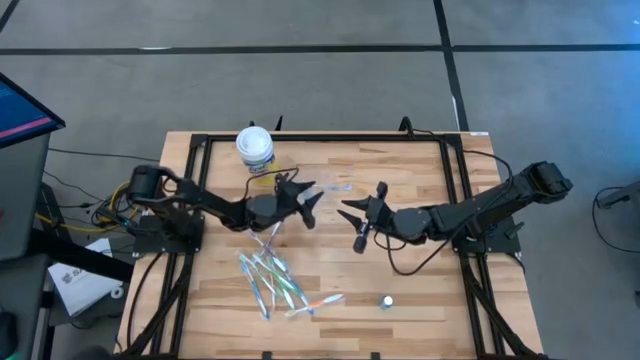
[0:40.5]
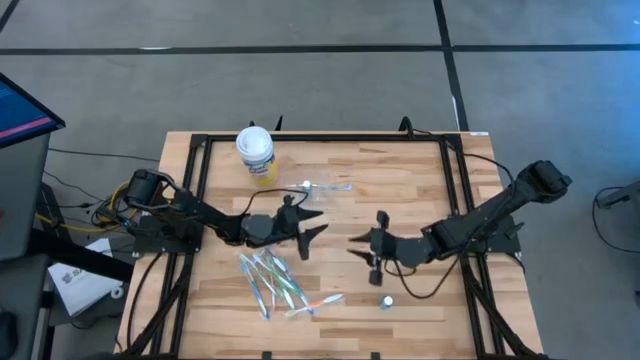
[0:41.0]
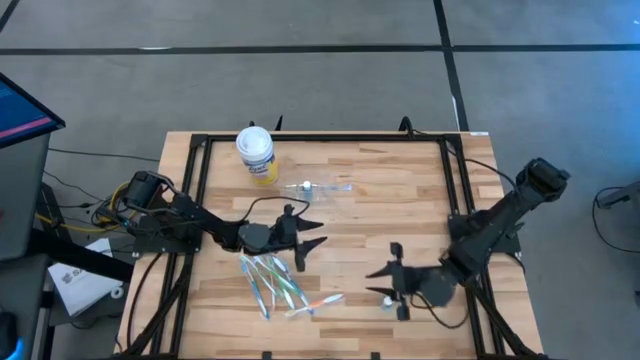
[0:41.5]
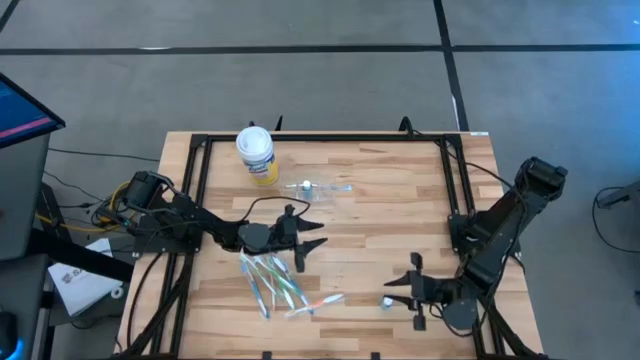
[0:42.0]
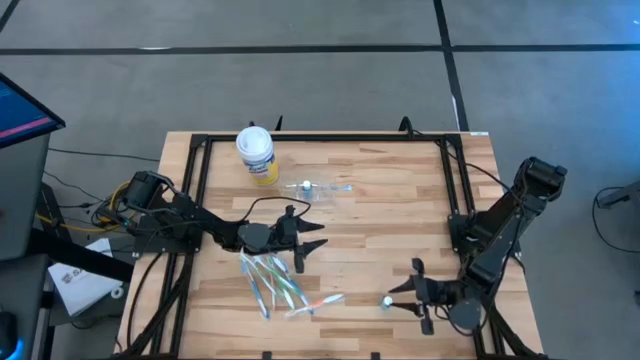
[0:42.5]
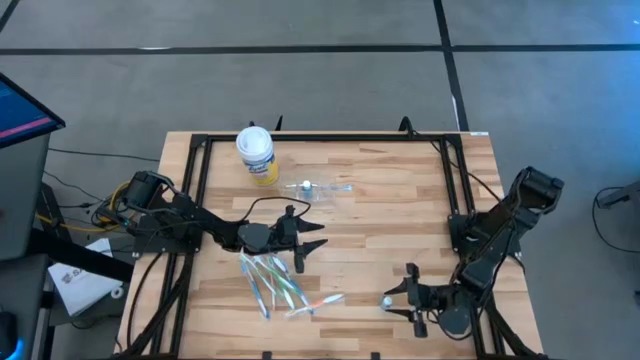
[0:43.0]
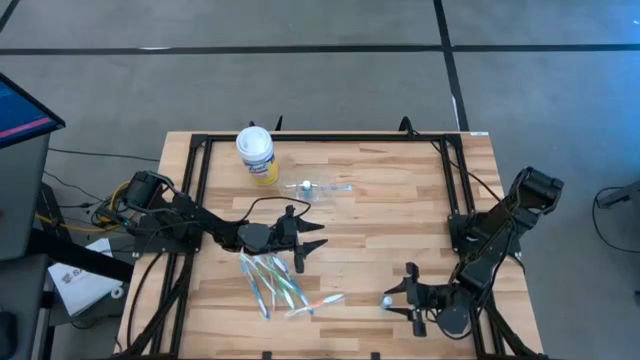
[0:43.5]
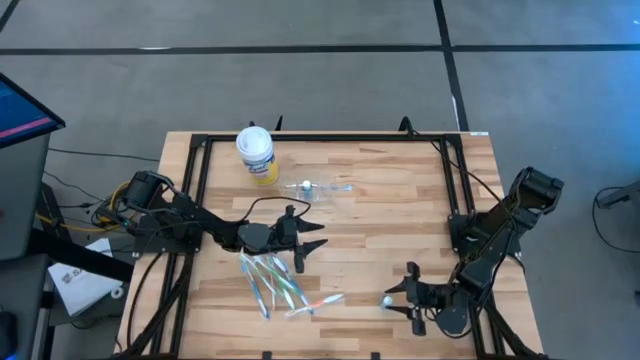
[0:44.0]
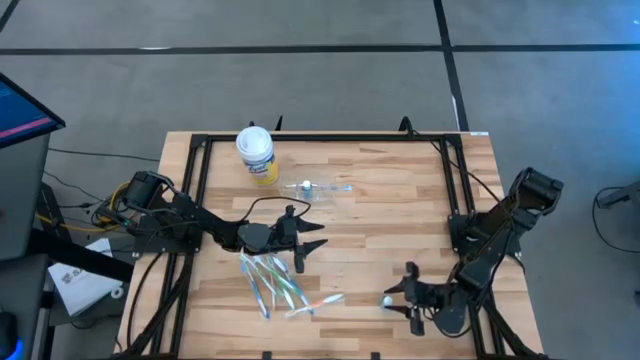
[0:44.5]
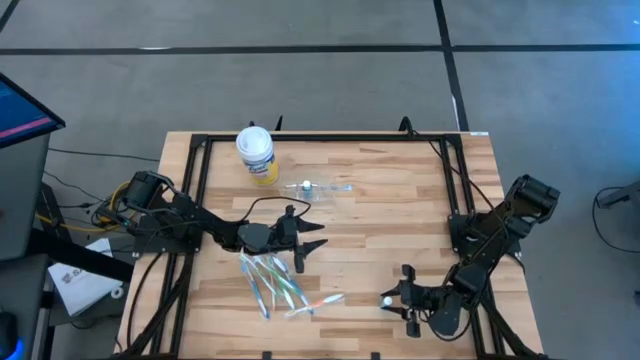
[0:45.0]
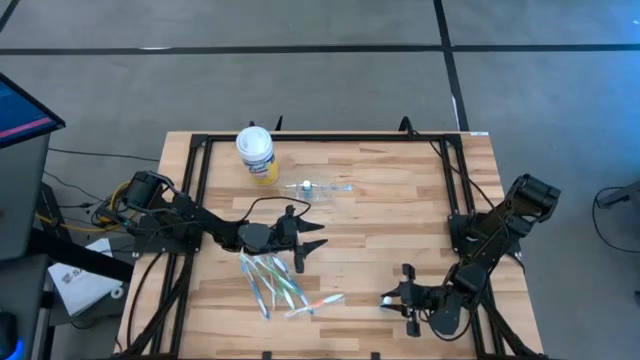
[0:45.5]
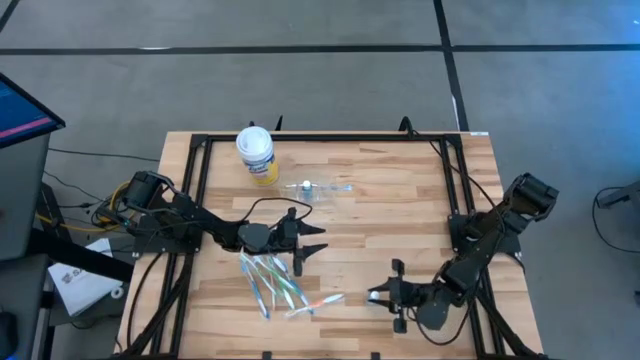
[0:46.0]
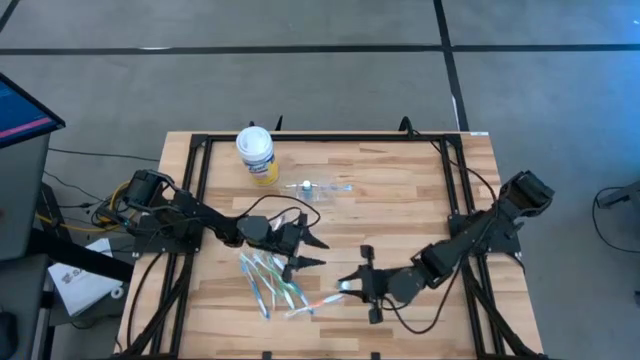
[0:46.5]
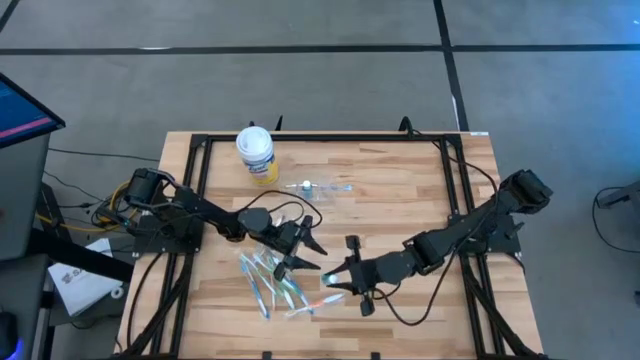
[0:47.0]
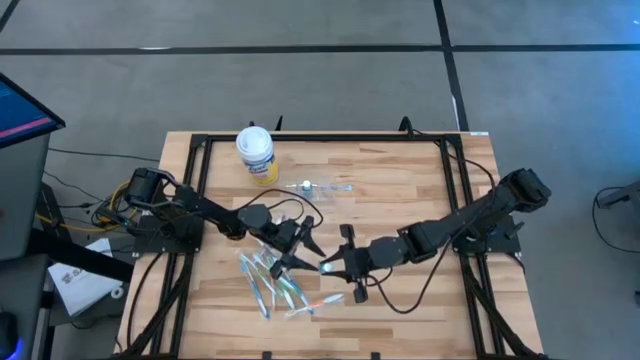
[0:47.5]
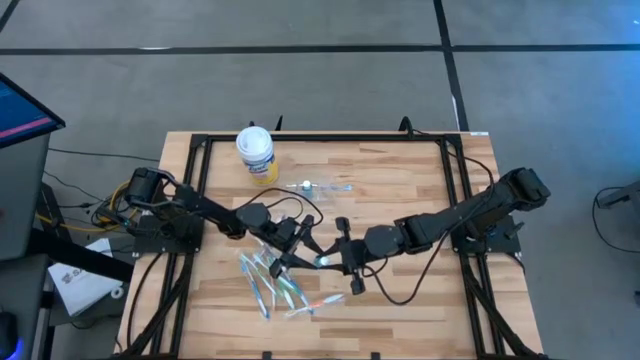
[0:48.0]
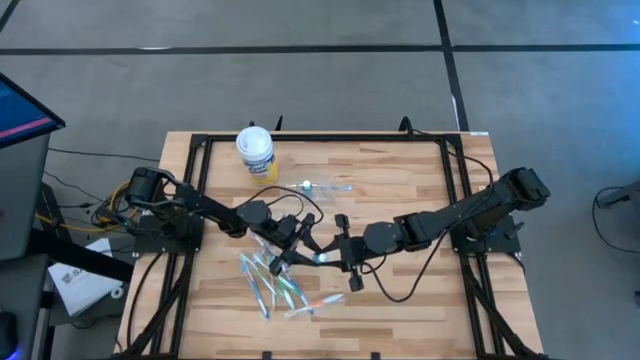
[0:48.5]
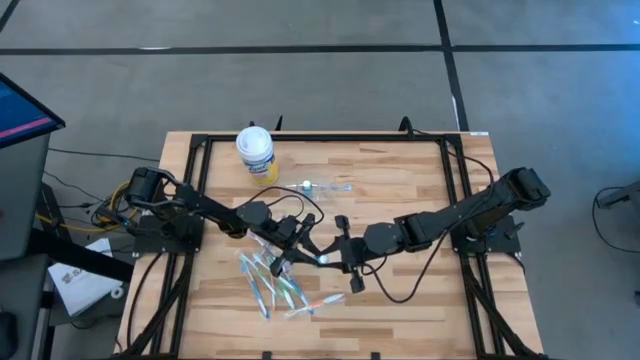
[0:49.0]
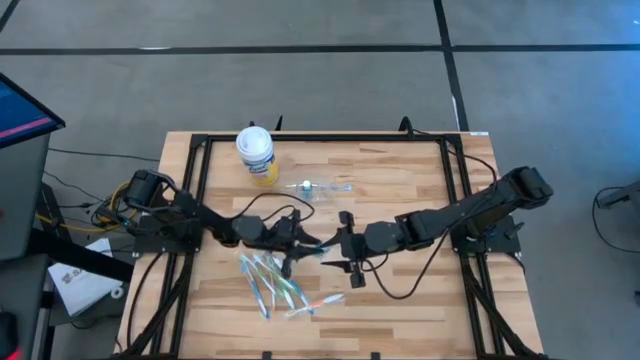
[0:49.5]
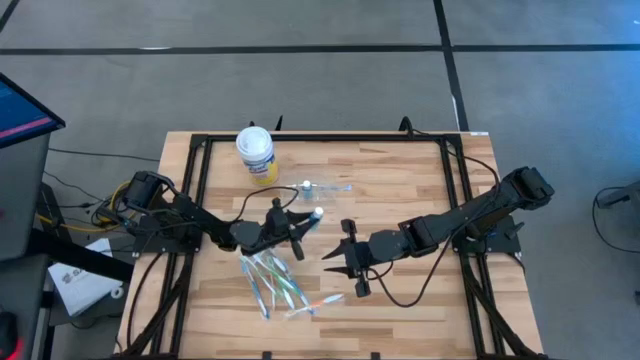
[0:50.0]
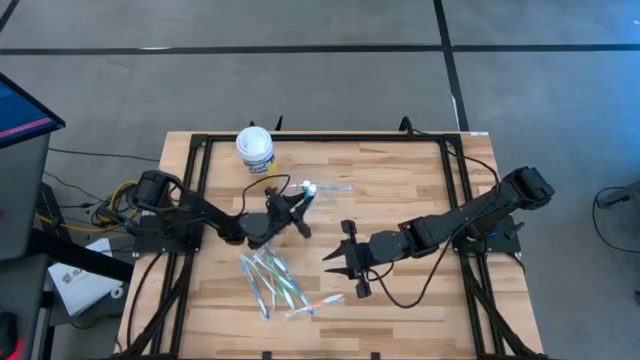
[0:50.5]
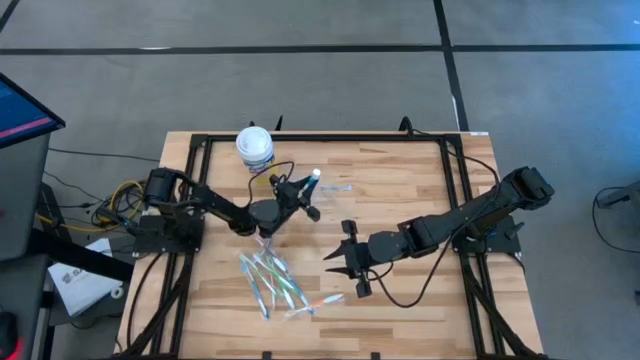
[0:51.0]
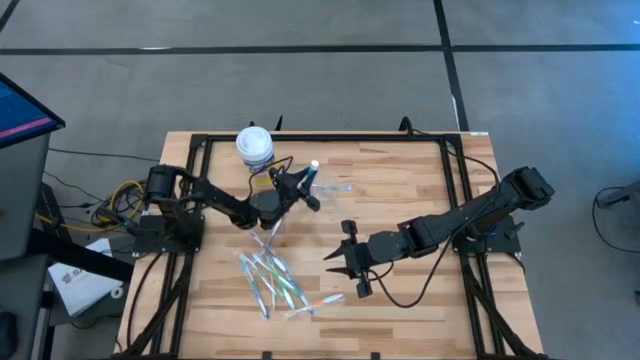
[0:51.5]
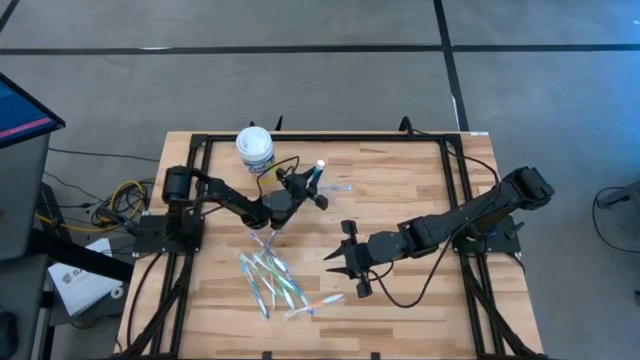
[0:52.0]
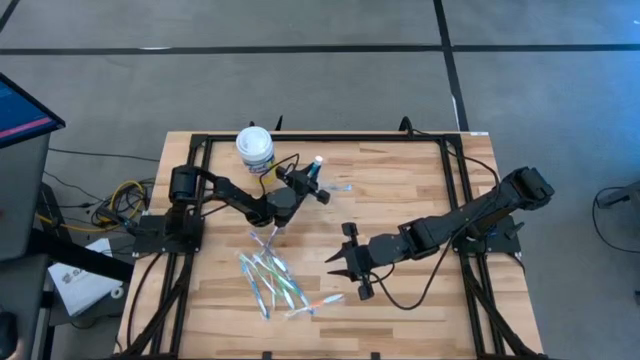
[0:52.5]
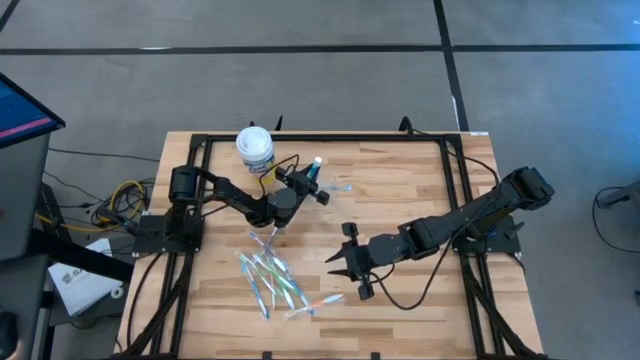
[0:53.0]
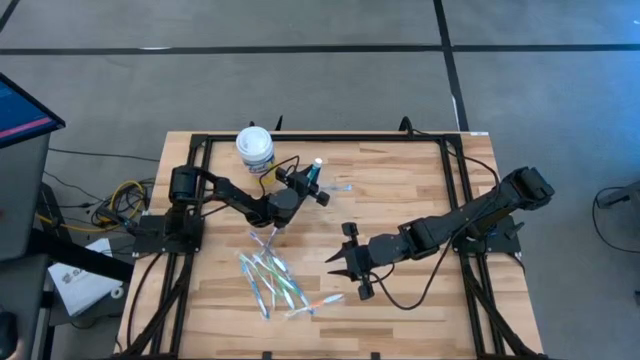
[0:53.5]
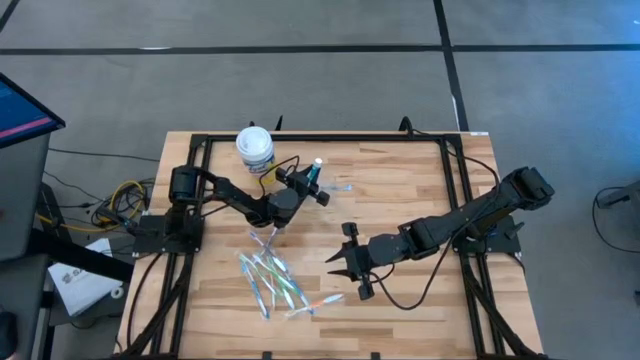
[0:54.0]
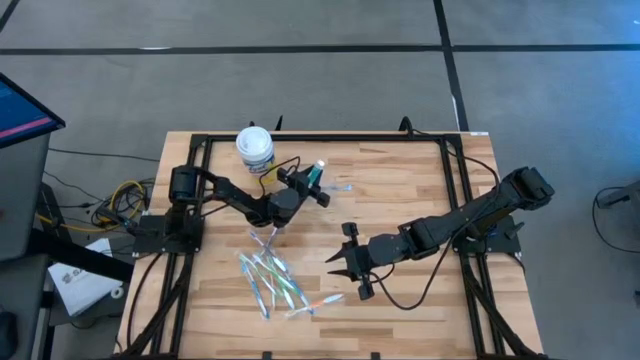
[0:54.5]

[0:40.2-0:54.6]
Task: Pick & Place toothbrushing station
Put the blue mouthwash into the transparent organizer
